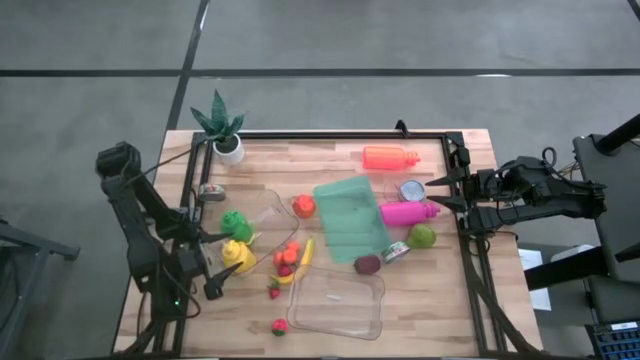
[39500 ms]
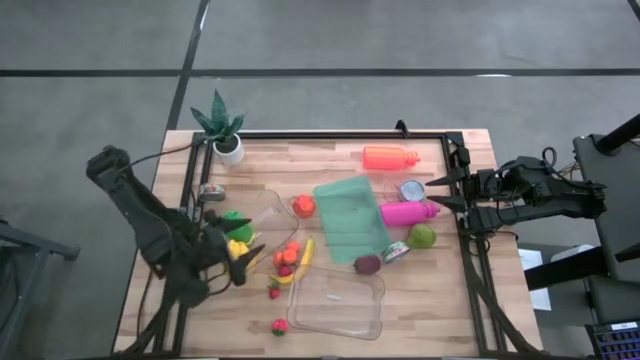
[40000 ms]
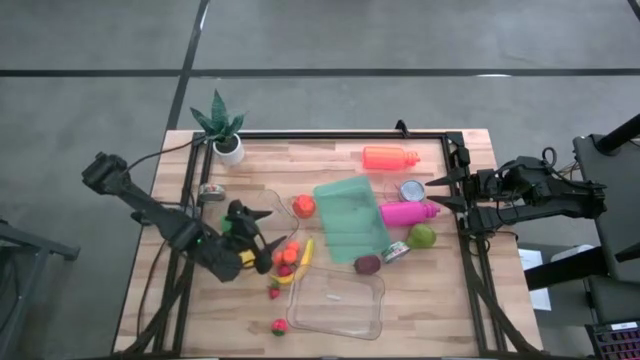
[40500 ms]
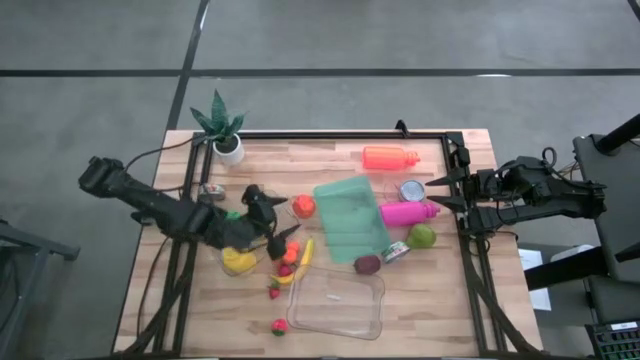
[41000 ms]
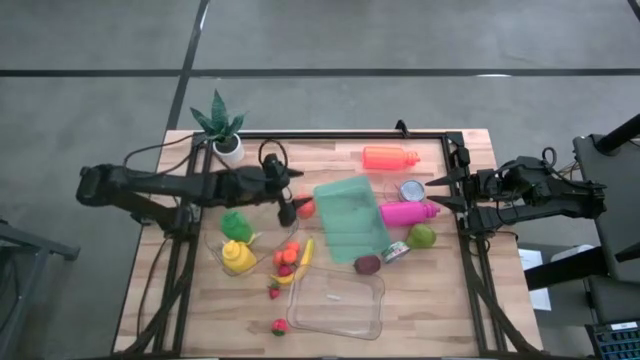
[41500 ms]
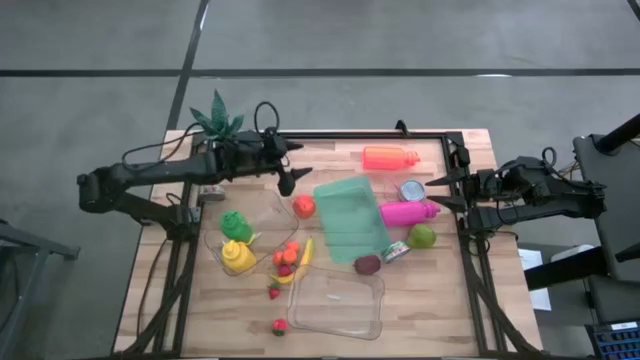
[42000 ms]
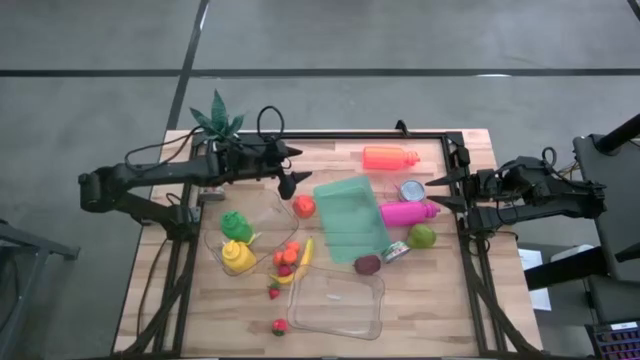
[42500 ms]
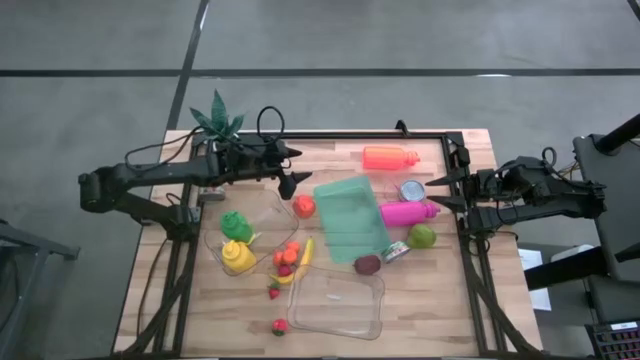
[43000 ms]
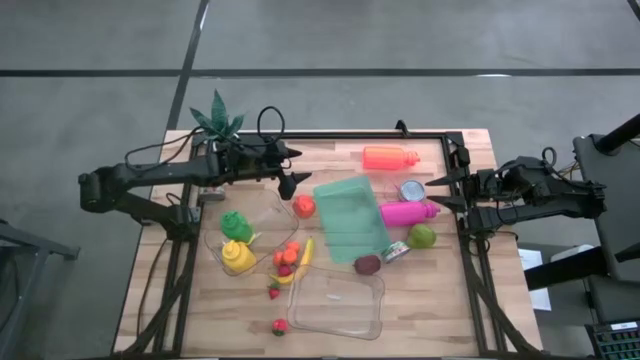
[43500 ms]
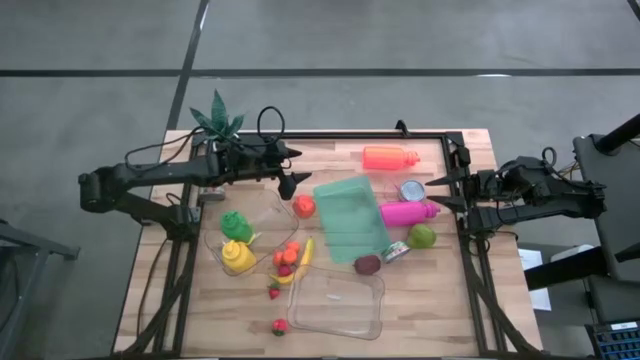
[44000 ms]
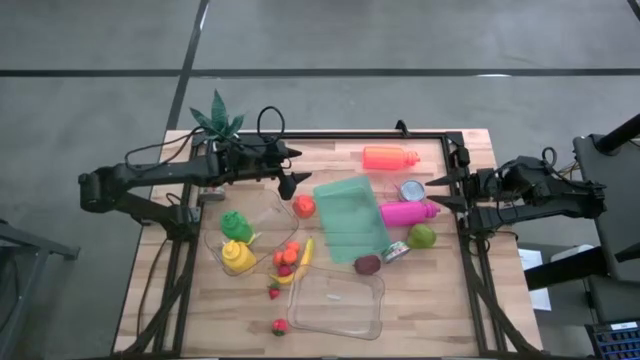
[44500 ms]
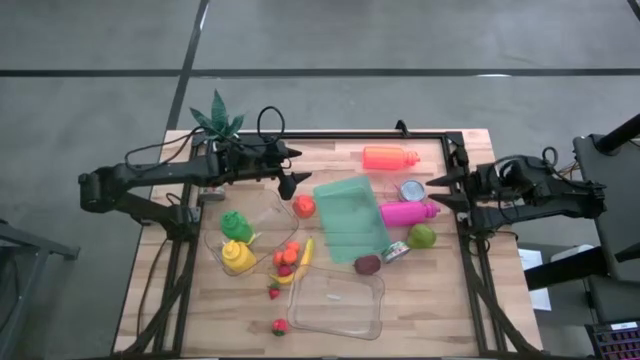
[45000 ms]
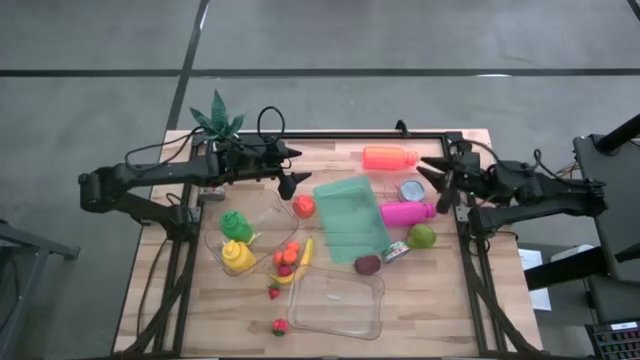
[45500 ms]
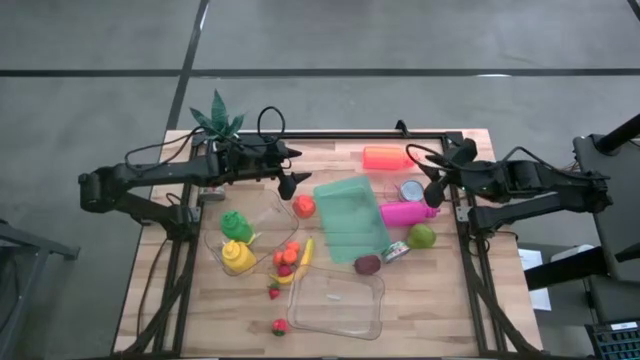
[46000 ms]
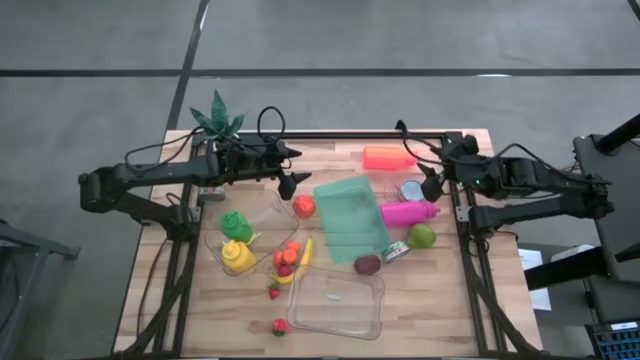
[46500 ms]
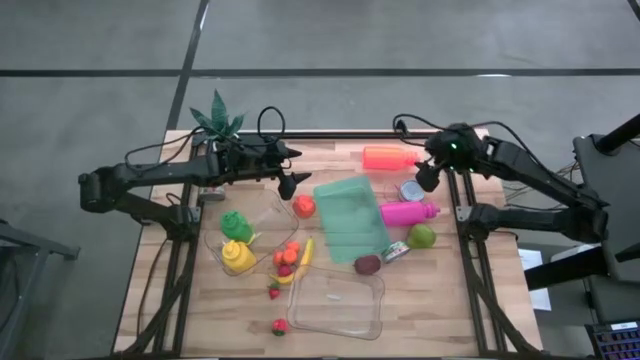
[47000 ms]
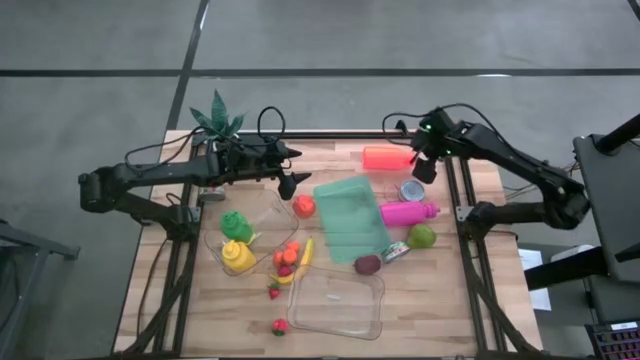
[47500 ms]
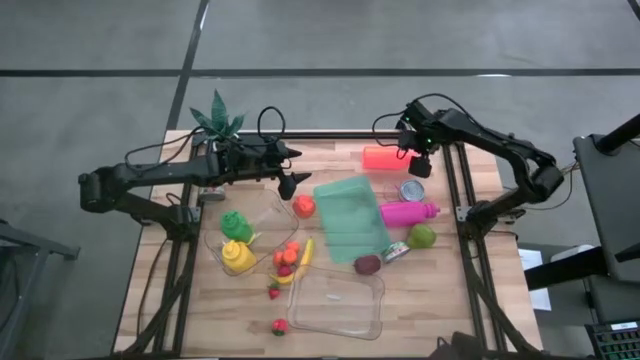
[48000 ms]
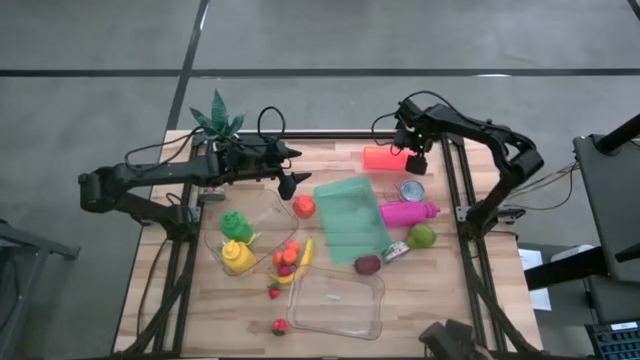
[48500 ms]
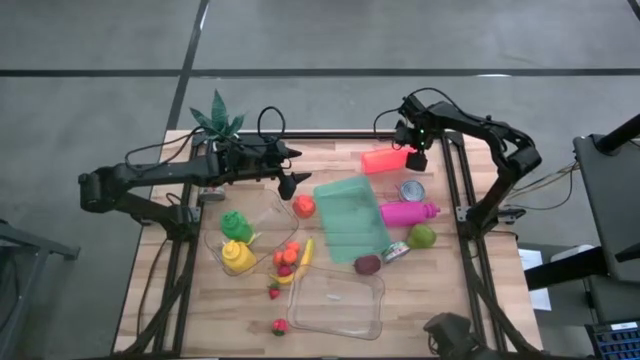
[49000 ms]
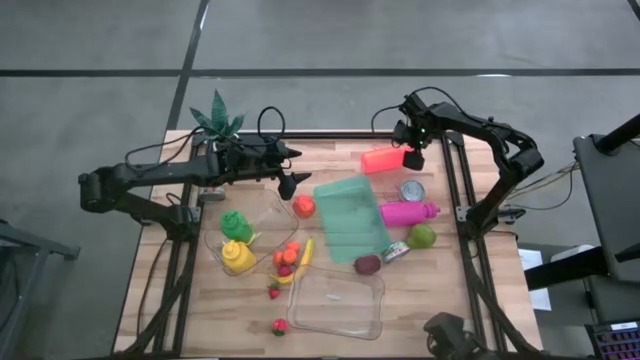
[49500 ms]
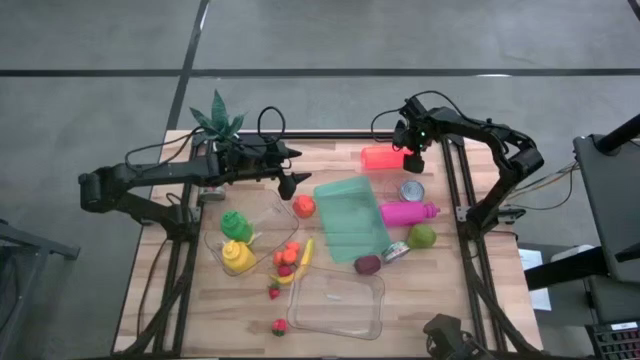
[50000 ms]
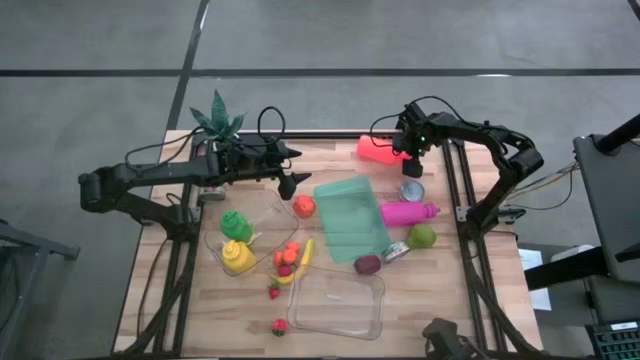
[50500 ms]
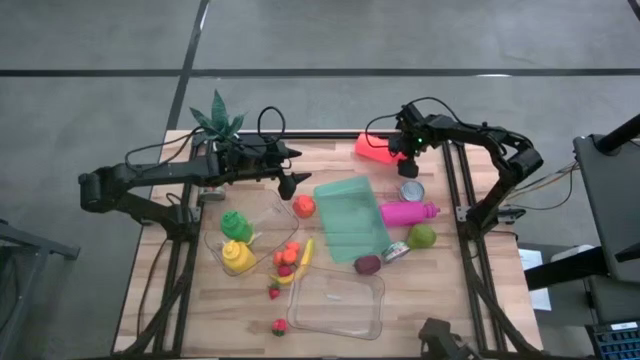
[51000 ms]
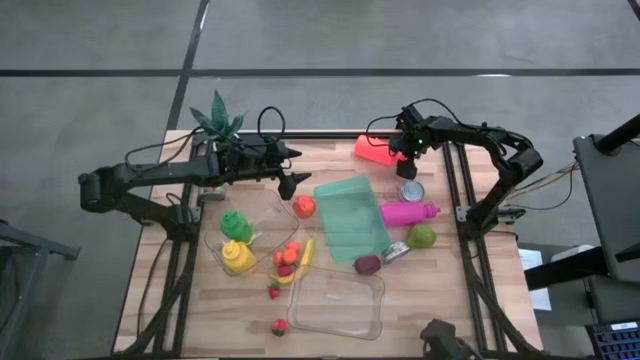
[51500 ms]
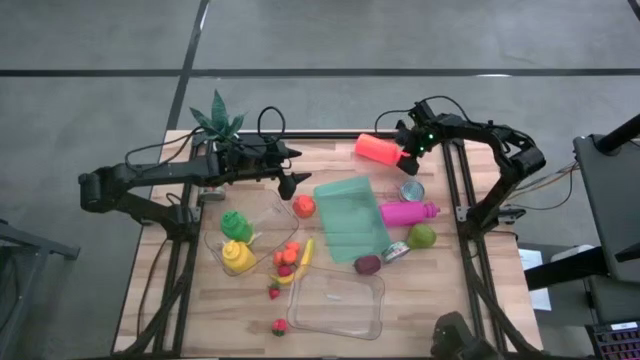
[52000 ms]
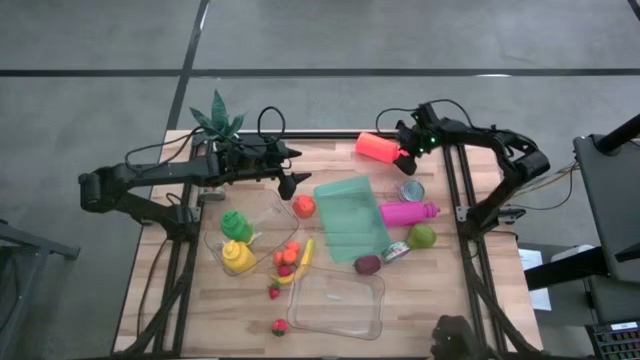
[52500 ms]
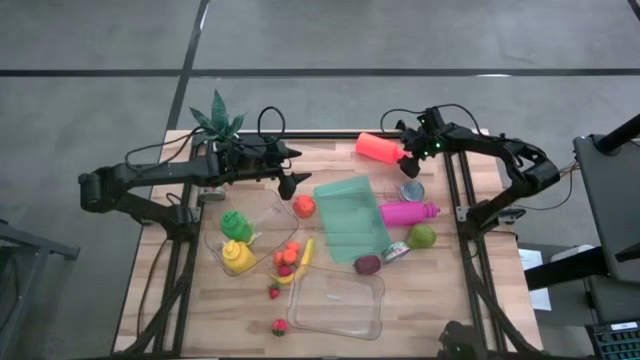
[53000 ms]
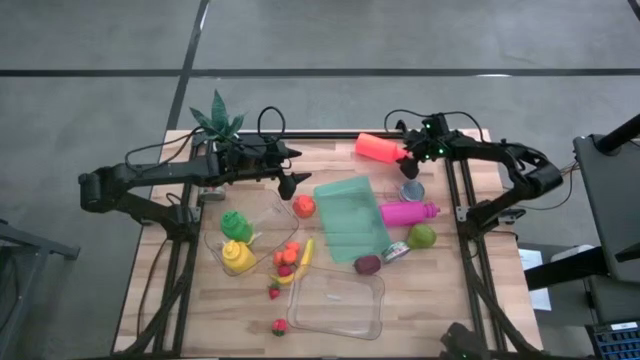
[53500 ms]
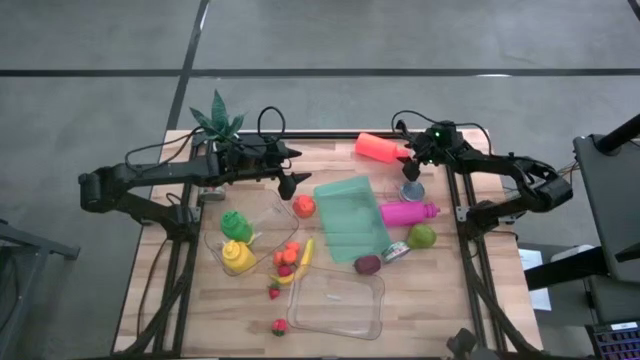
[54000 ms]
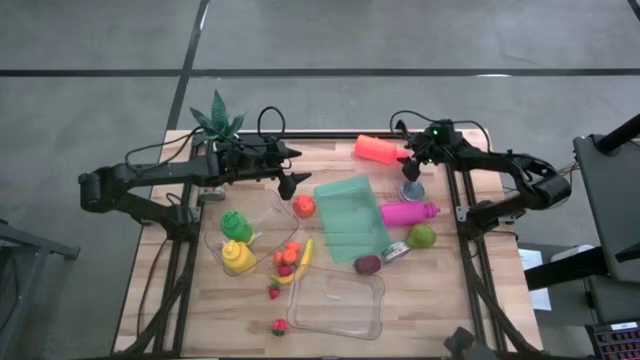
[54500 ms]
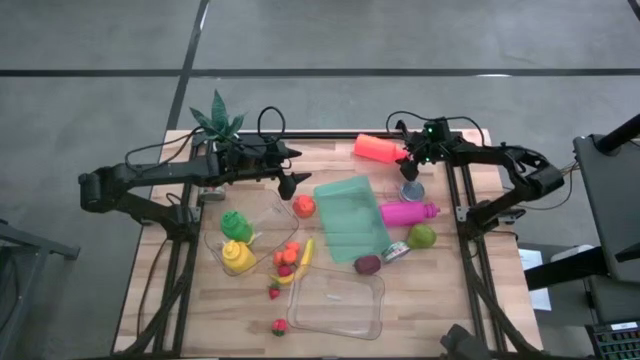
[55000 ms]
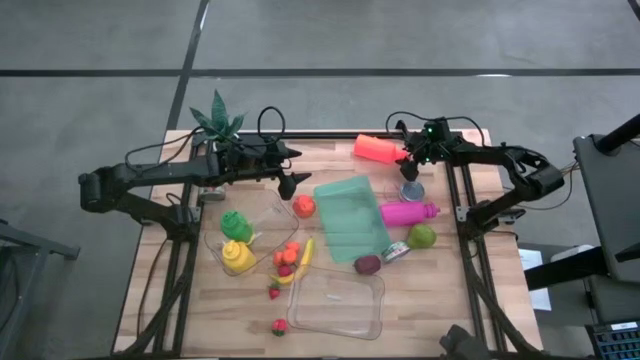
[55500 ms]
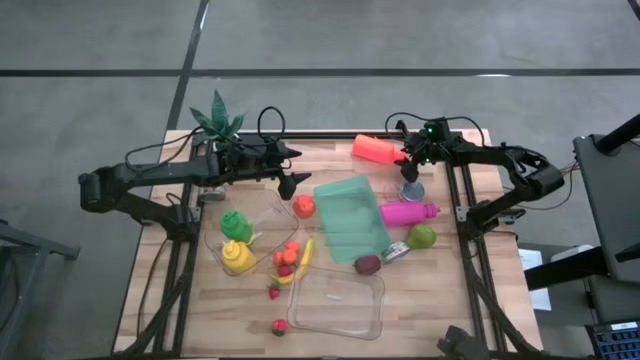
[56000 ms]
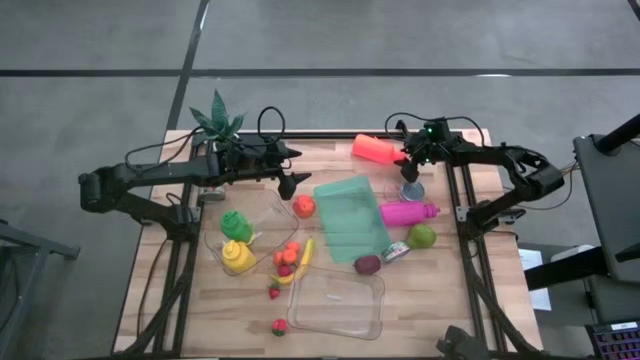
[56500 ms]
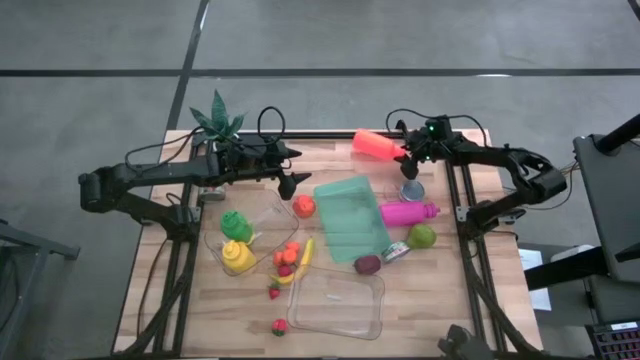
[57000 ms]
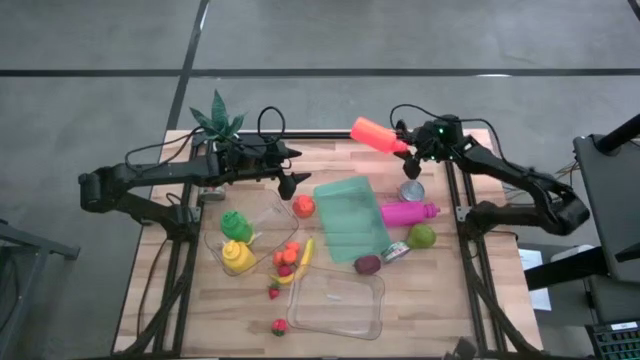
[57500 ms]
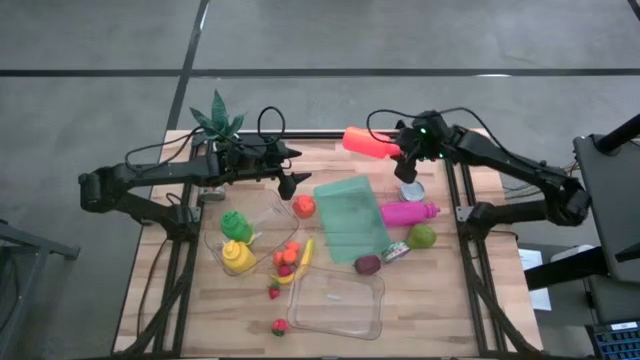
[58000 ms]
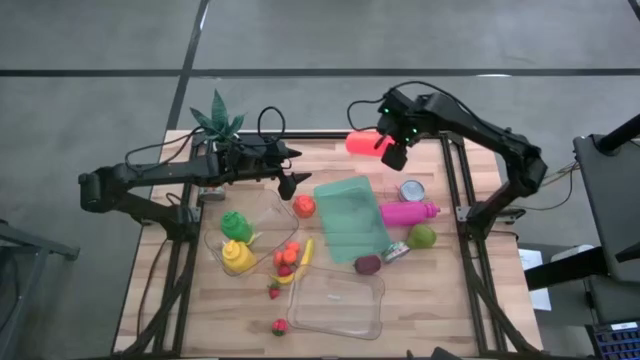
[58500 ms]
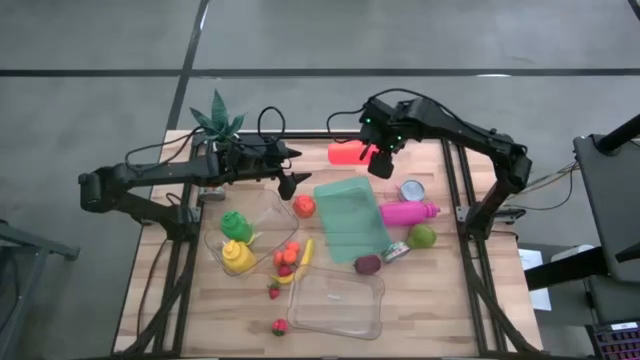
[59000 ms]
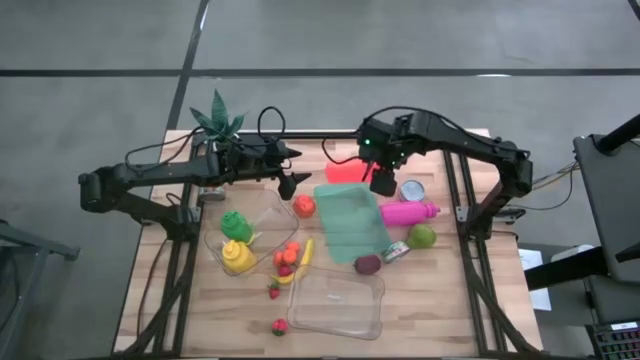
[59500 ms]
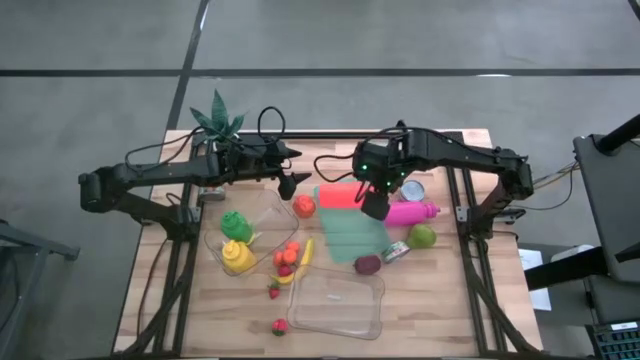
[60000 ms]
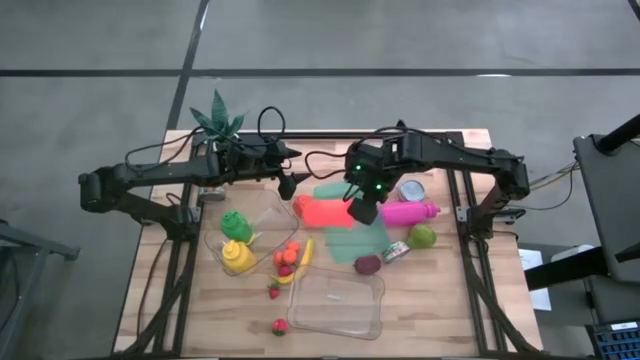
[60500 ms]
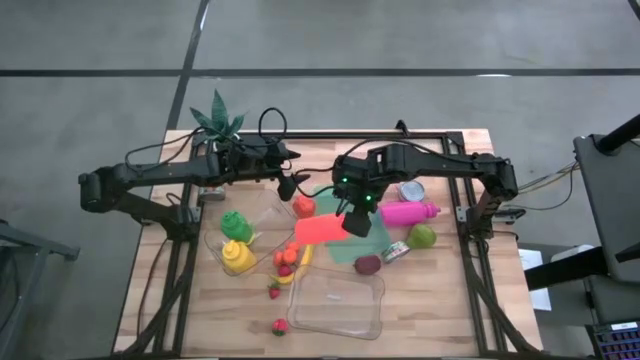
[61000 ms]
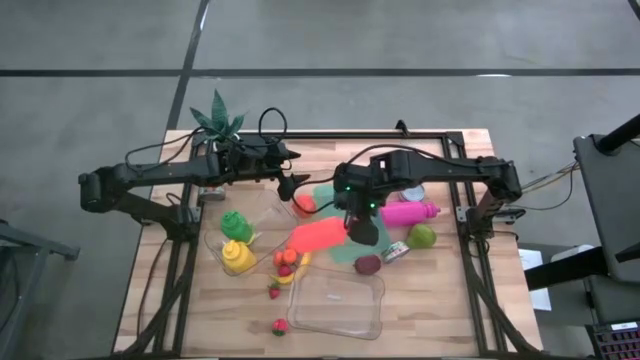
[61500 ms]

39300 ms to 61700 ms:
Task: Pick & Place Food Item
Put the orange water bottle into the top transparent bin
